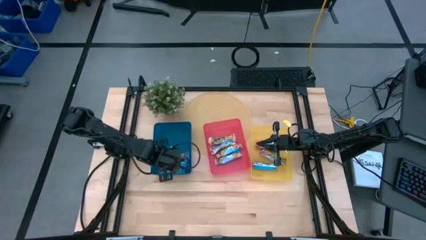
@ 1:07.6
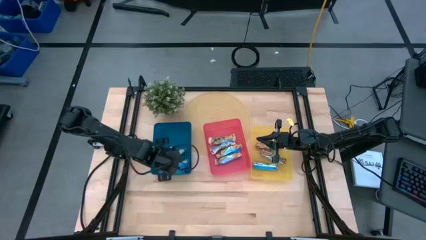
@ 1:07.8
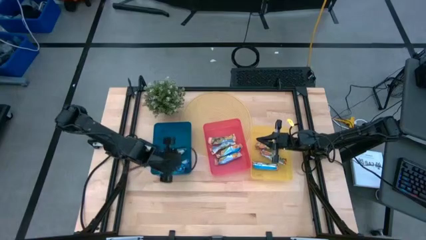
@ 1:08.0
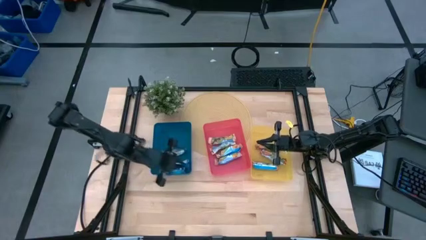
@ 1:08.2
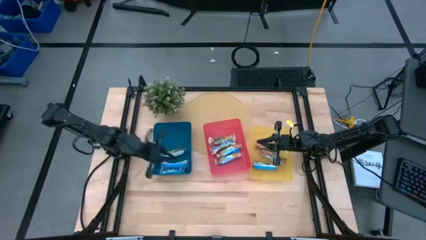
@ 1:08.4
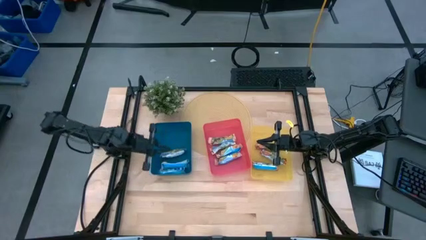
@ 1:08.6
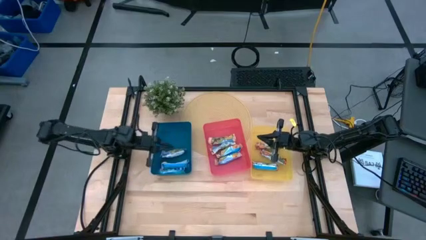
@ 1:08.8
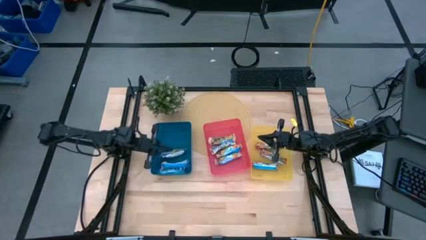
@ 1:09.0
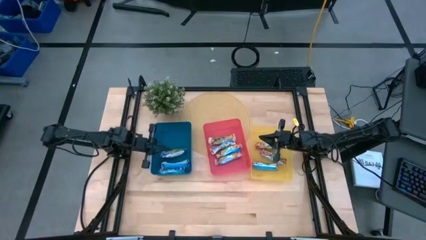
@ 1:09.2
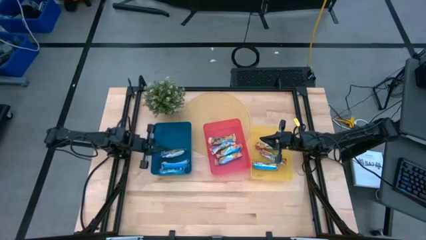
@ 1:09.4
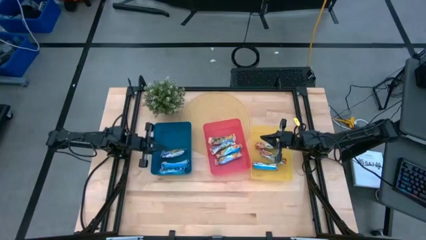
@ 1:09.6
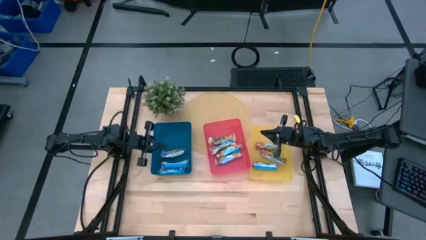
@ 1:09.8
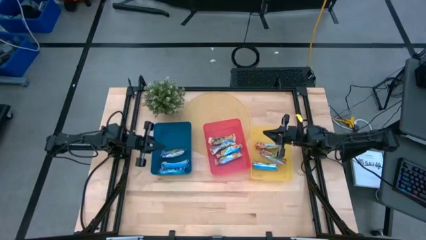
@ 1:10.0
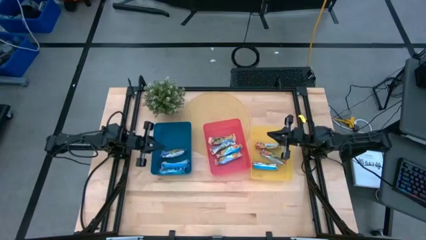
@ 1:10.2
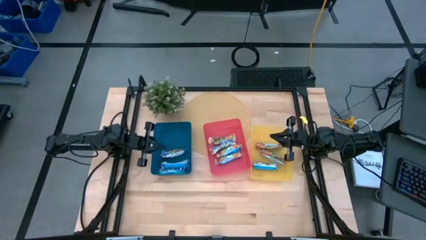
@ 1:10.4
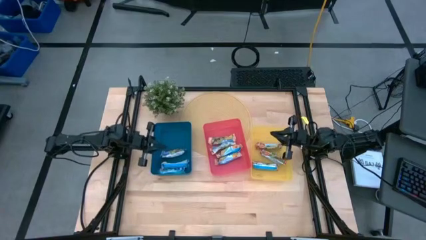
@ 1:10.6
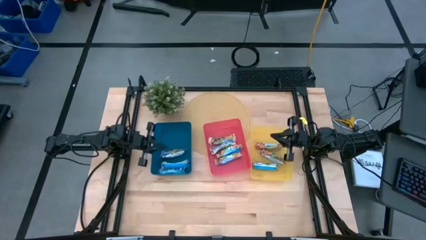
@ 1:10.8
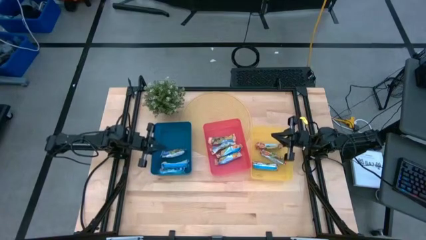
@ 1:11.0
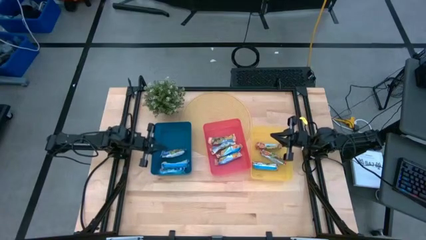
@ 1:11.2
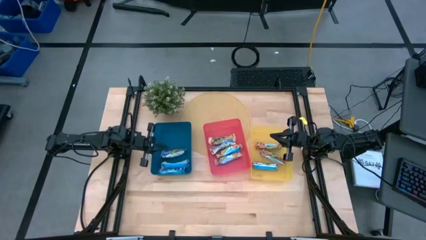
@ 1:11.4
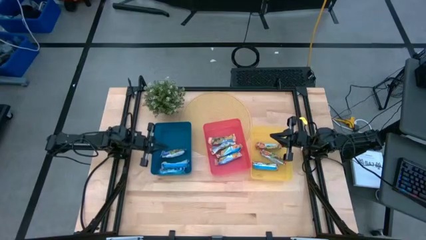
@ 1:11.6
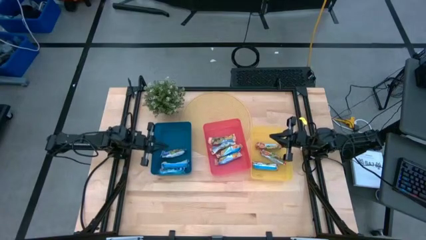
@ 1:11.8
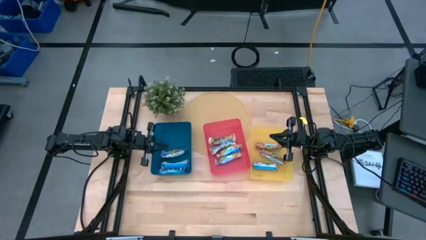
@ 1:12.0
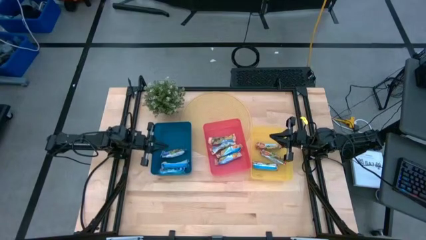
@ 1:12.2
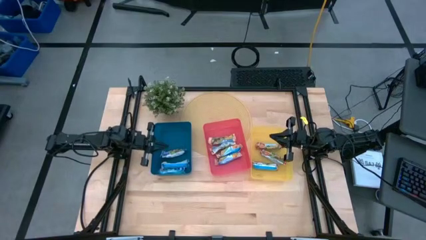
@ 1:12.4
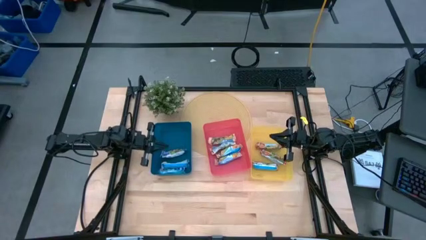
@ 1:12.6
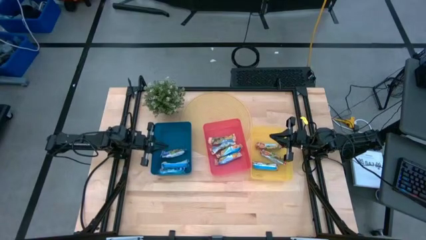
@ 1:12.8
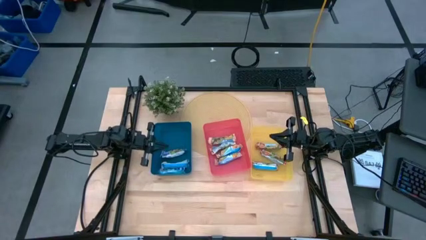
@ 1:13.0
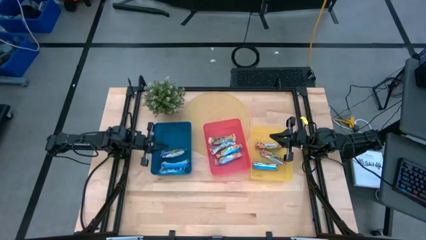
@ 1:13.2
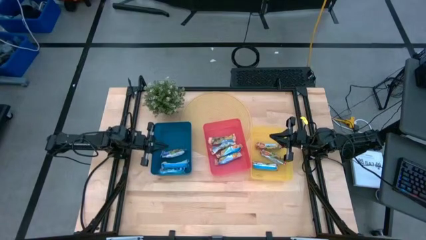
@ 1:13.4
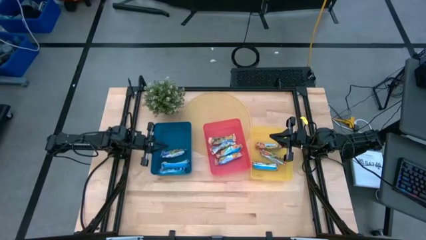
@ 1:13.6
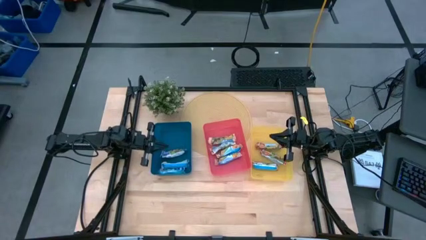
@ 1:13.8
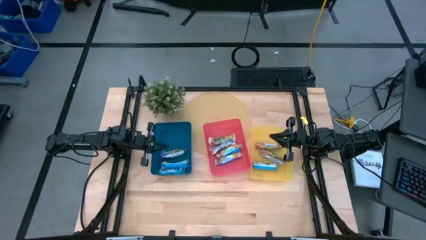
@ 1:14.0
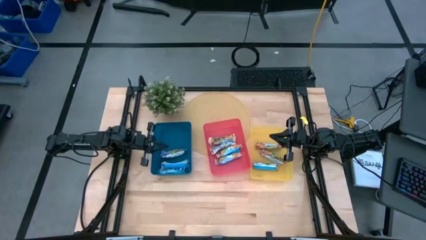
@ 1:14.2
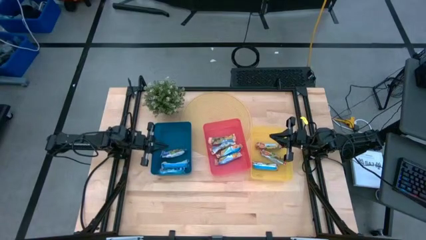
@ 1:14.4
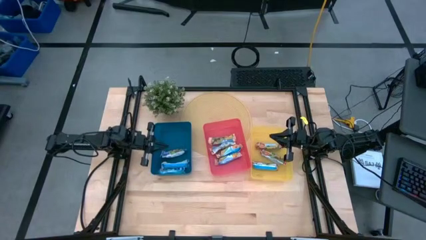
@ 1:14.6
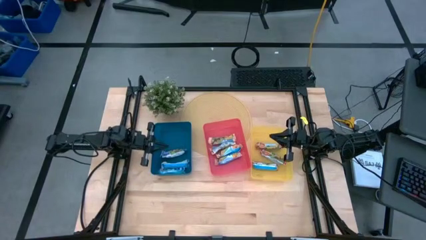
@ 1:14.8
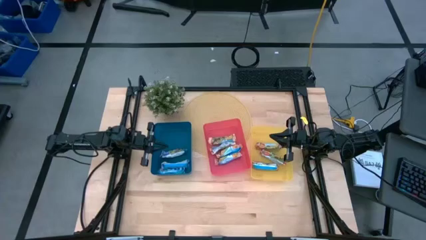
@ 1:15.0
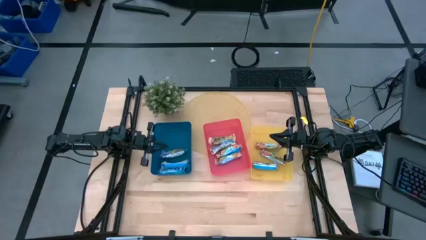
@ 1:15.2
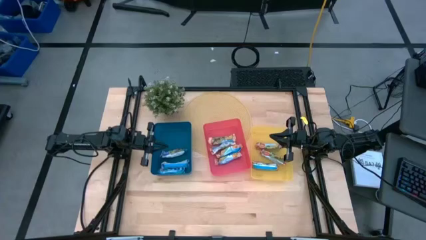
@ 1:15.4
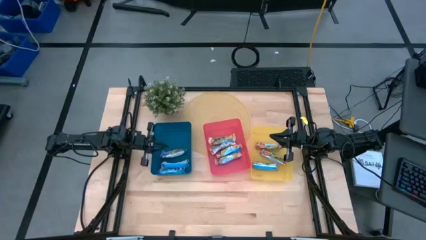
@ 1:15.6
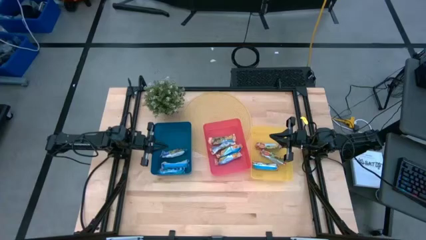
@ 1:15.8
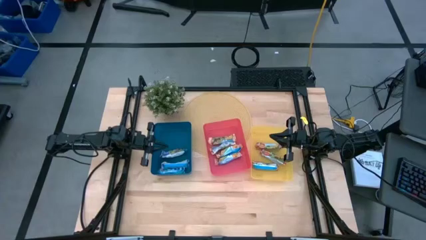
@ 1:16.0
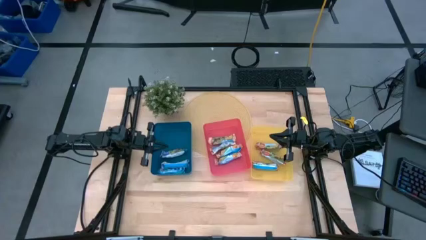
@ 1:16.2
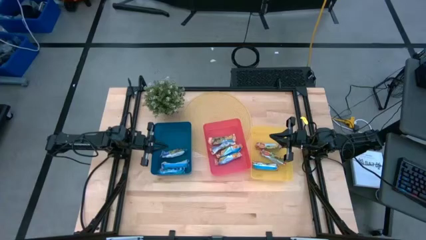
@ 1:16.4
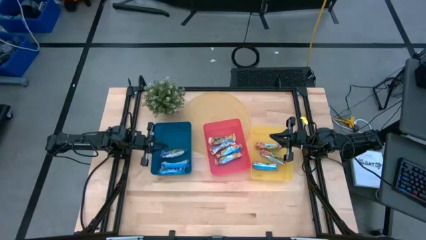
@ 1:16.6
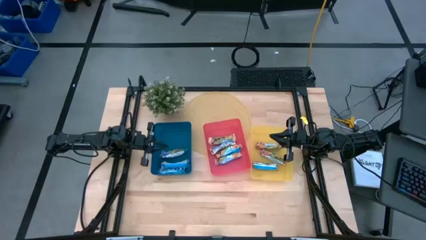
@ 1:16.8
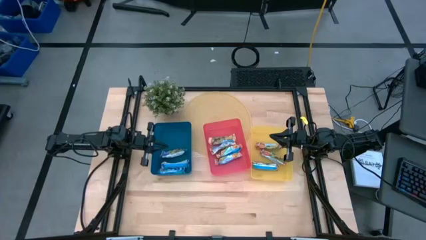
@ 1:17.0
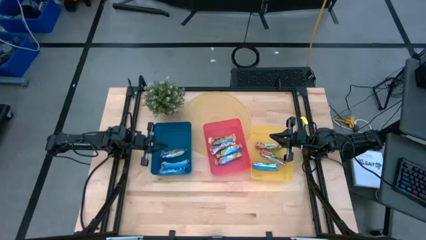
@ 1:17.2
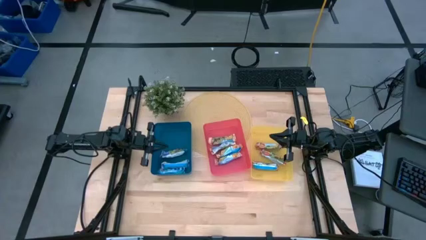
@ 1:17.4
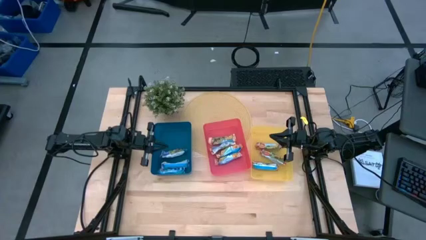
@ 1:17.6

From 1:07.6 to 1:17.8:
Task: Pick and place Granola Bars by type
Return to Home Position

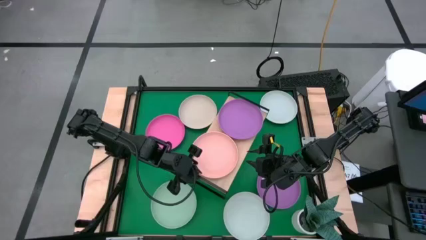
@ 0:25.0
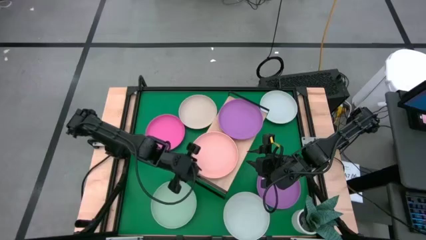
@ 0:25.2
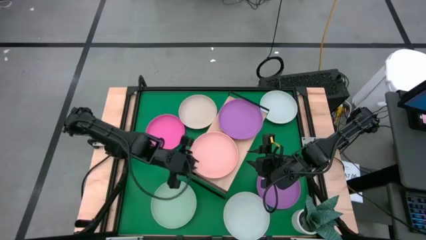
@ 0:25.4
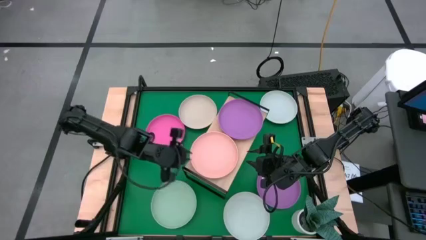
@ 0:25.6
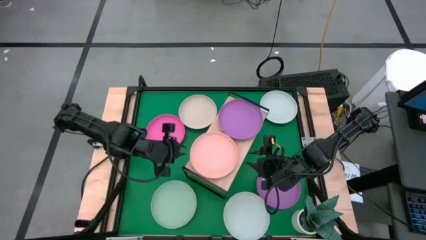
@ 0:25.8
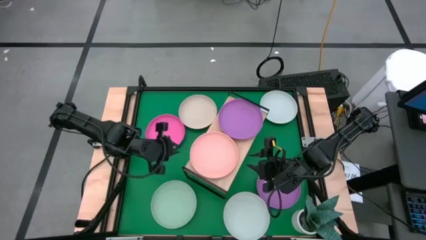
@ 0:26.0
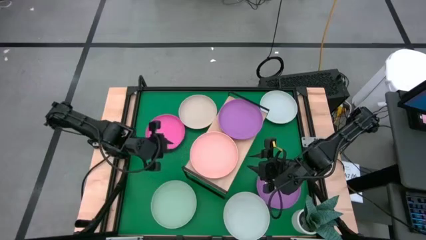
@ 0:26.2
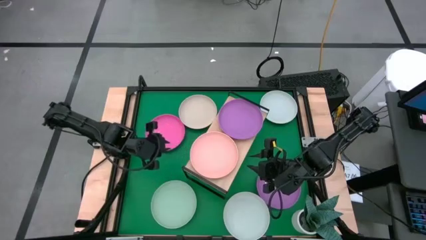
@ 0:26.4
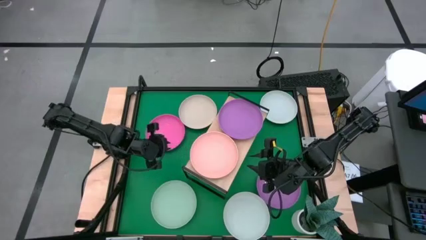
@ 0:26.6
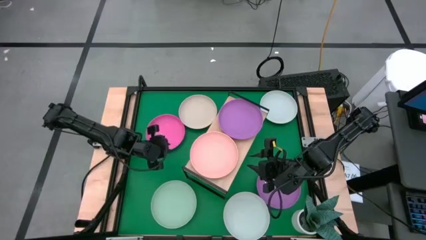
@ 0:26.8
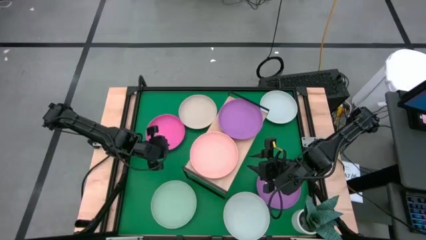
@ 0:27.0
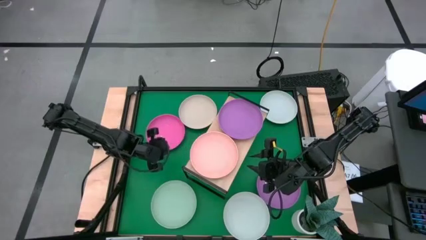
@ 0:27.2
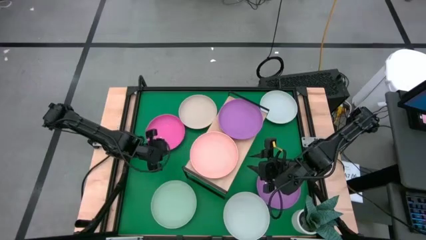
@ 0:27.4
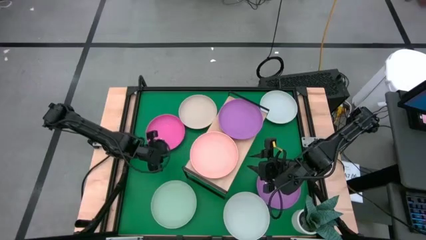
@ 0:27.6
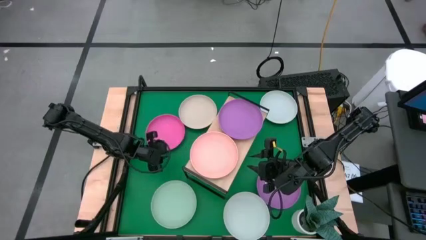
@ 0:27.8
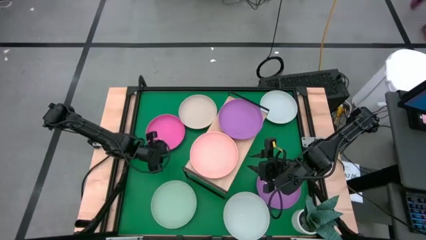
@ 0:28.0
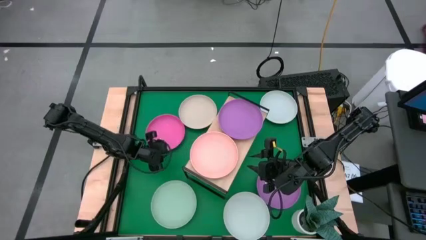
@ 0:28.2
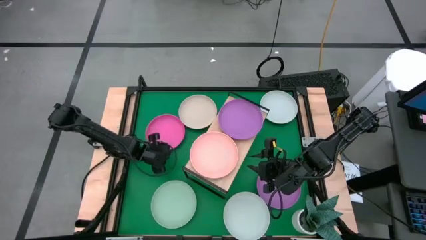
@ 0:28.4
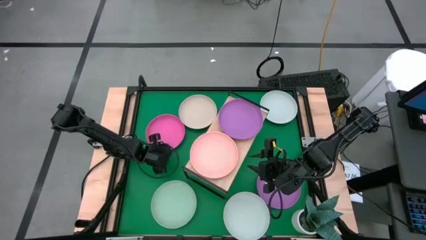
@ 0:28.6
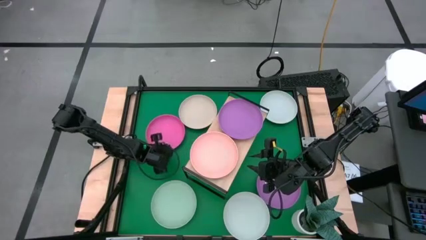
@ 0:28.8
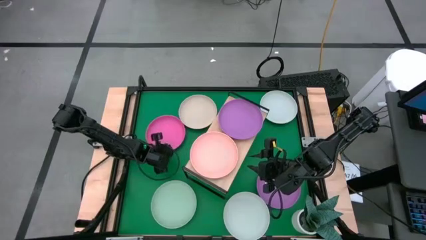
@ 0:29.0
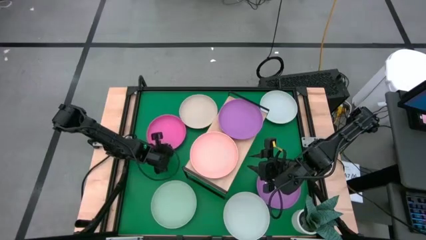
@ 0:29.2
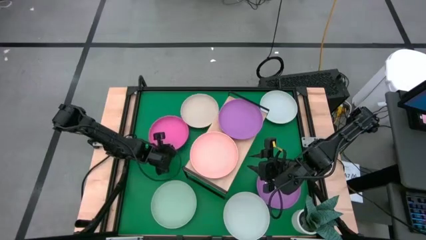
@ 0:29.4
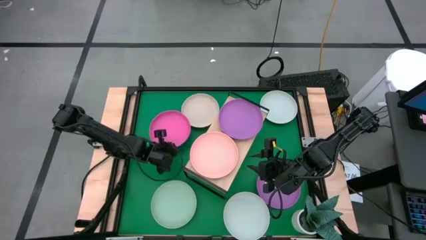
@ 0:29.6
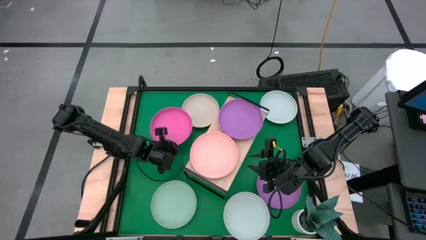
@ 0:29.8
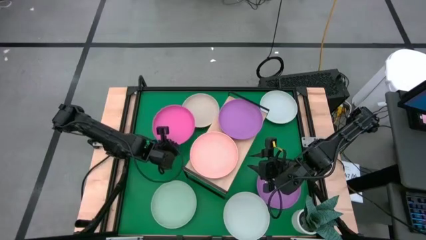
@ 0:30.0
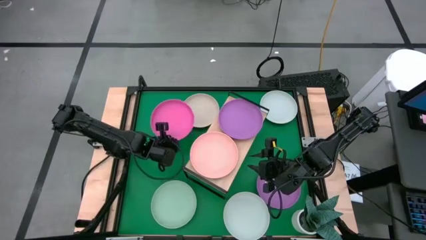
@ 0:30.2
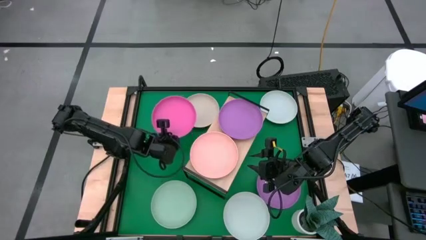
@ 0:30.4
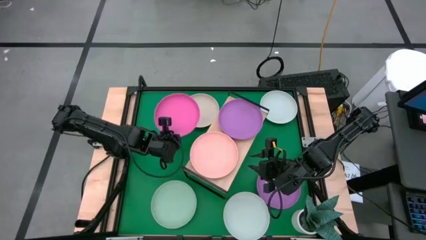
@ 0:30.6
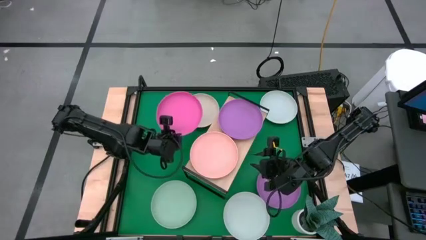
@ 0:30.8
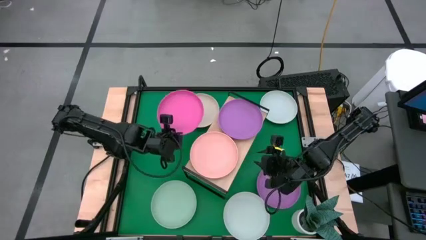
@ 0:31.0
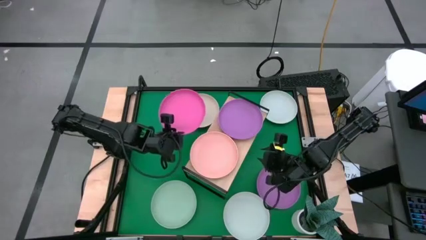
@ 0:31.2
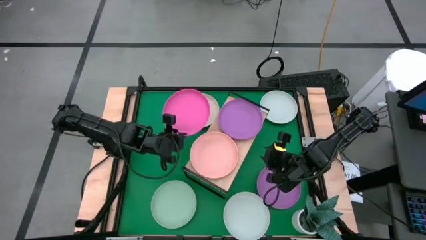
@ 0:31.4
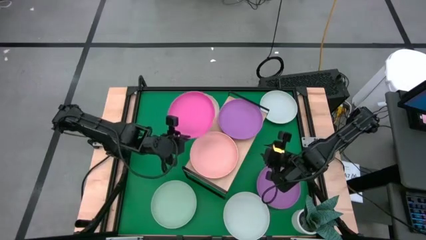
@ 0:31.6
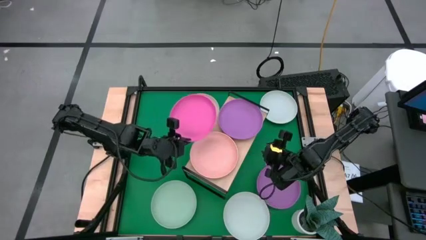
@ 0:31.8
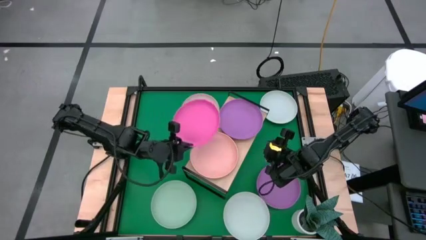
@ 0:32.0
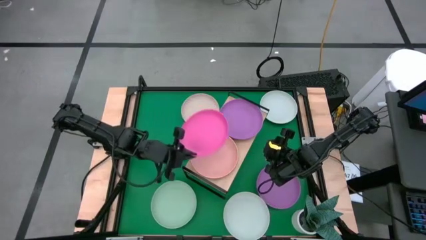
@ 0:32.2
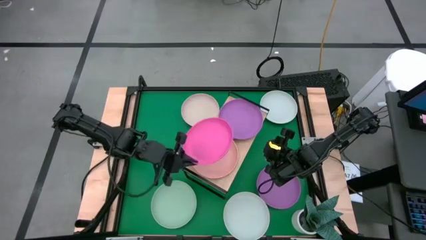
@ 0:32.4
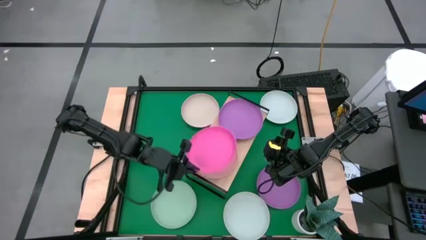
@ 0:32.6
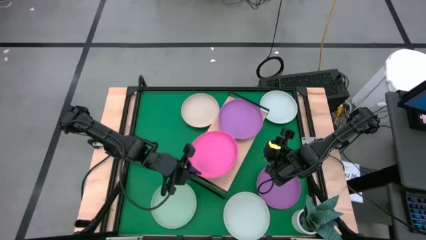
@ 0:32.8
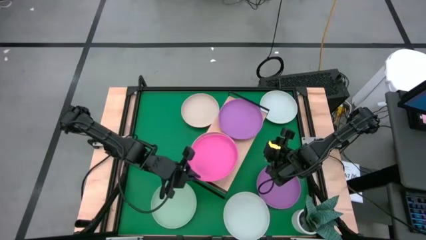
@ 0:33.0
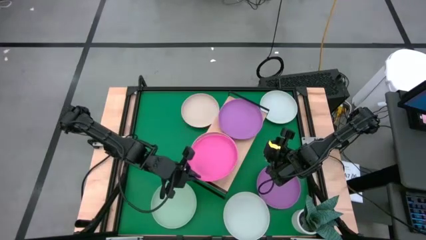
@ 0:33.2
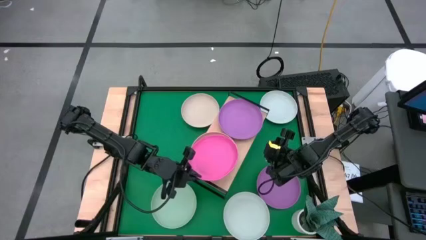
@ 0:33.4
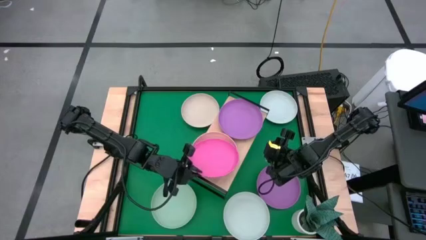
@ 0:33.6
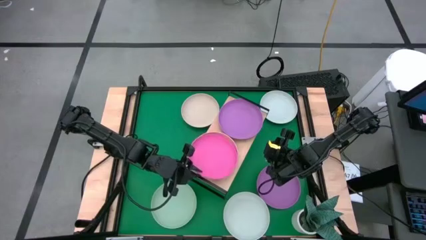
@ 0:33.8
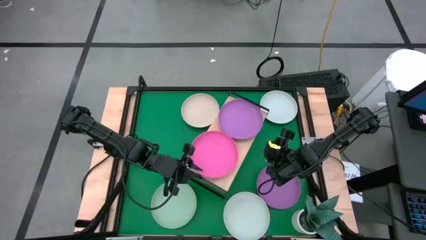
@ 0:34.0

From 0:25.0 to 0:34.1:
Task: Place and stack plates onto a shelf
Stack the pink plate on top of the light pink plate on the shelf
